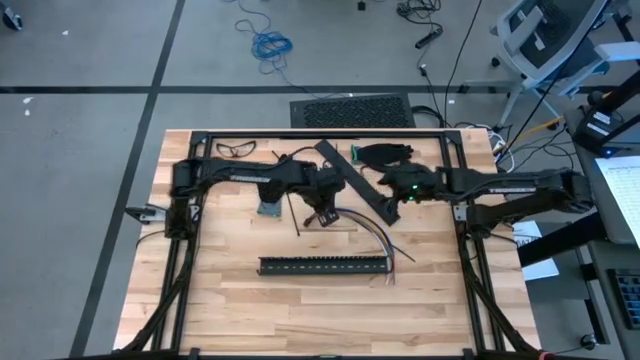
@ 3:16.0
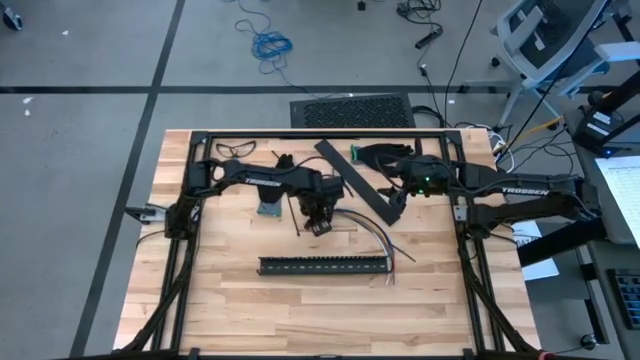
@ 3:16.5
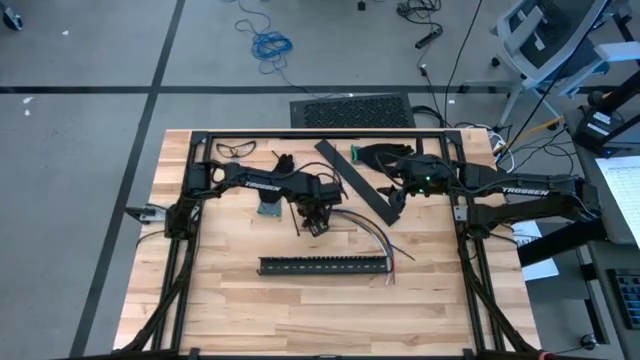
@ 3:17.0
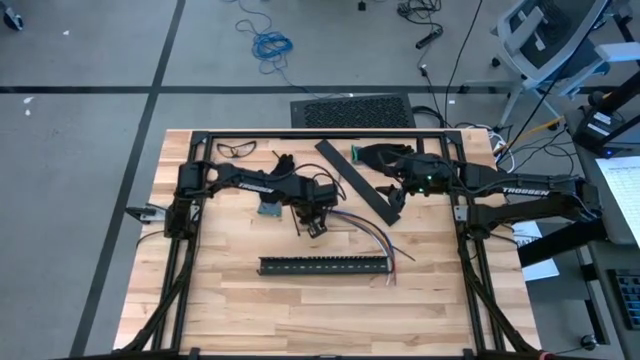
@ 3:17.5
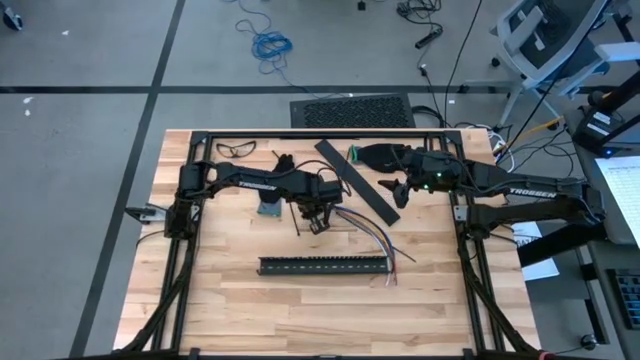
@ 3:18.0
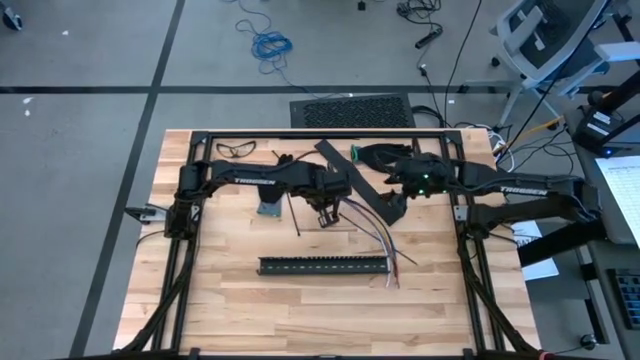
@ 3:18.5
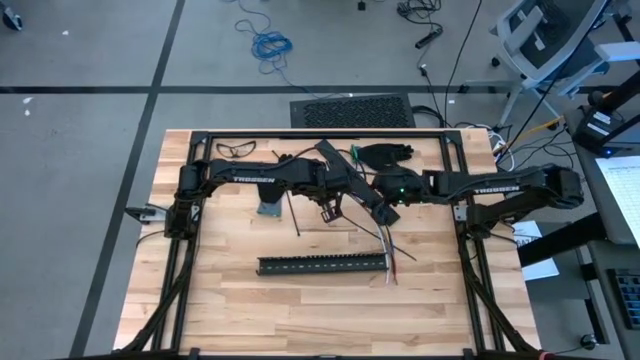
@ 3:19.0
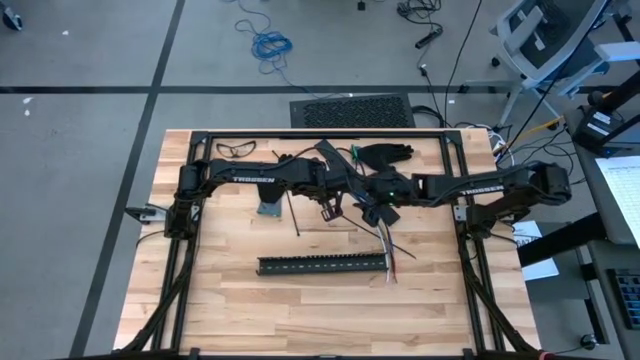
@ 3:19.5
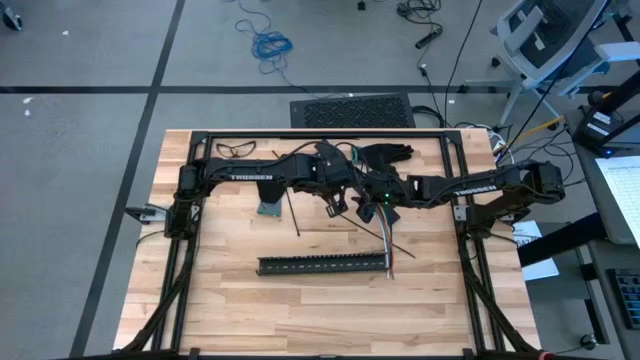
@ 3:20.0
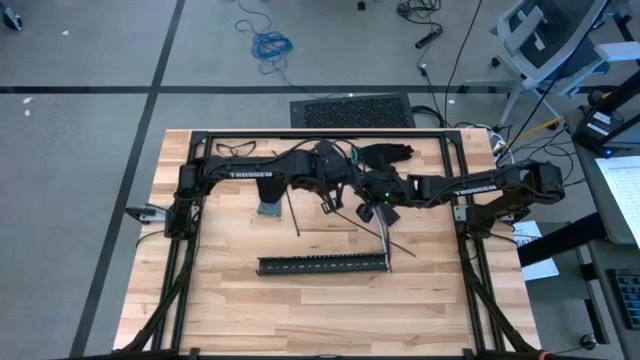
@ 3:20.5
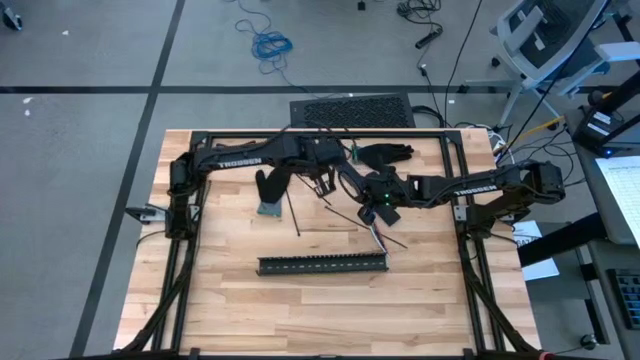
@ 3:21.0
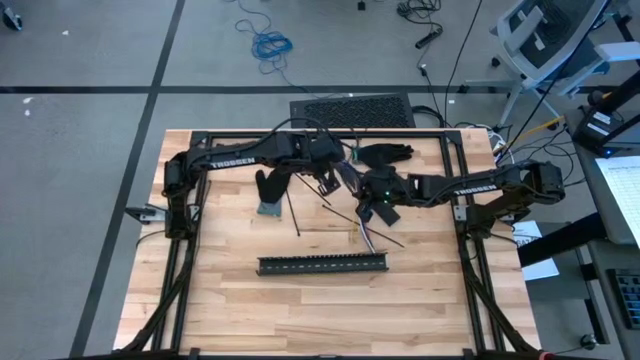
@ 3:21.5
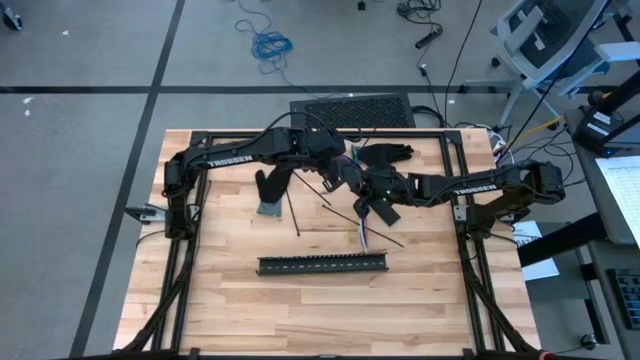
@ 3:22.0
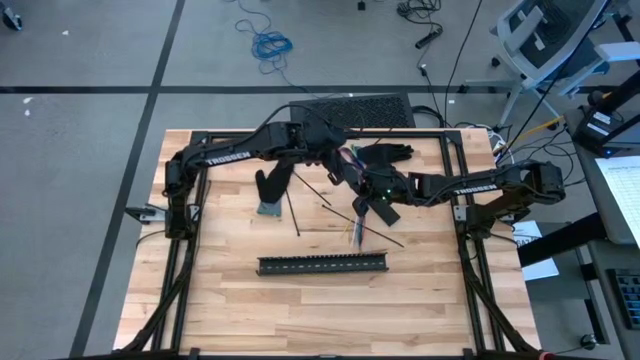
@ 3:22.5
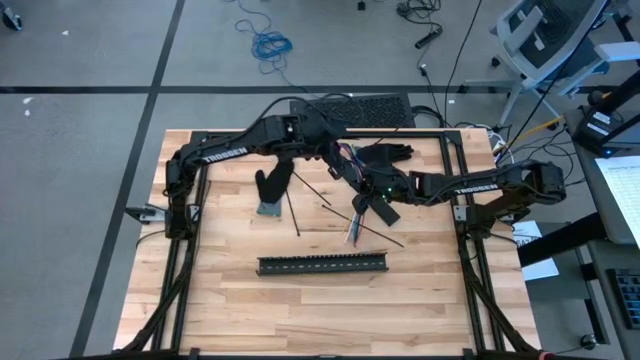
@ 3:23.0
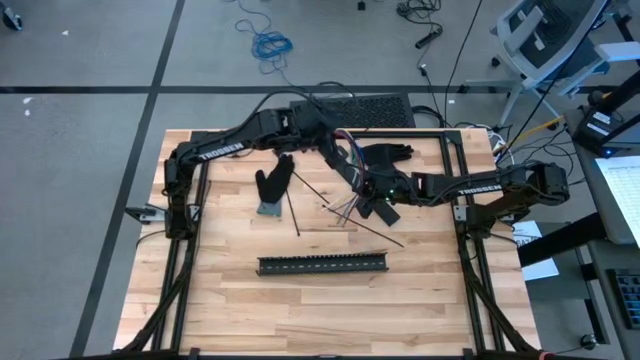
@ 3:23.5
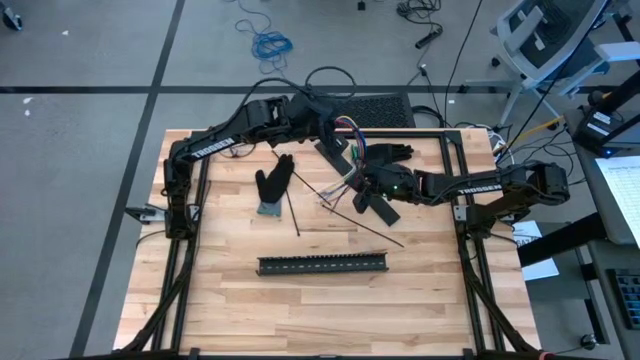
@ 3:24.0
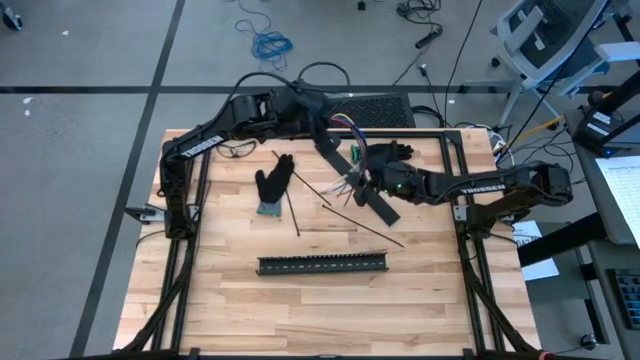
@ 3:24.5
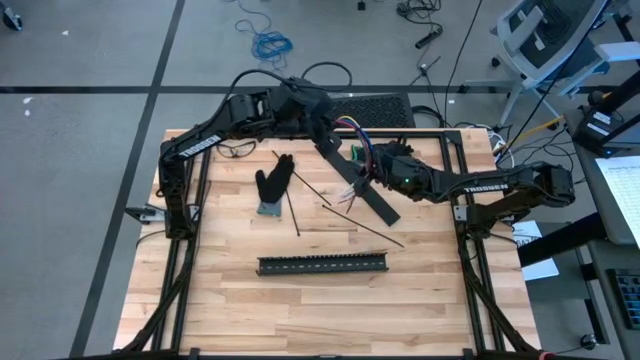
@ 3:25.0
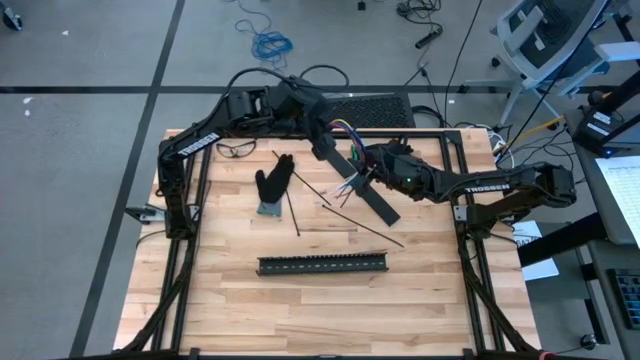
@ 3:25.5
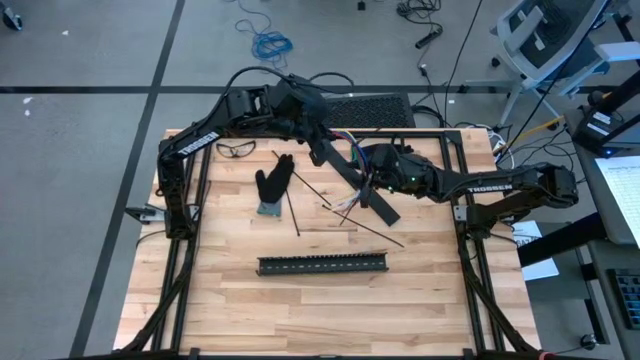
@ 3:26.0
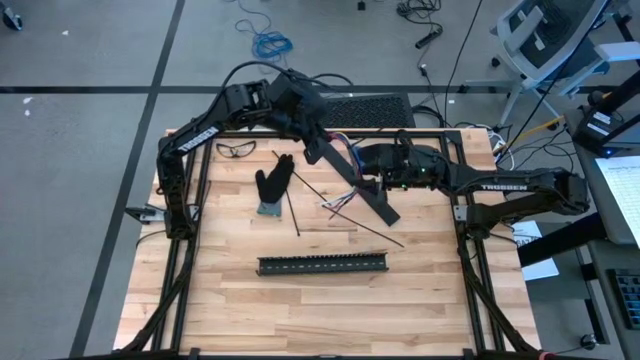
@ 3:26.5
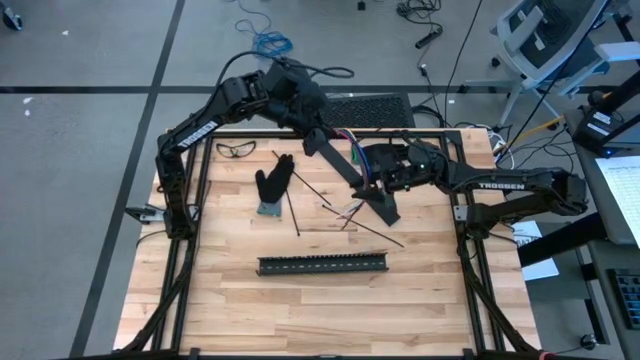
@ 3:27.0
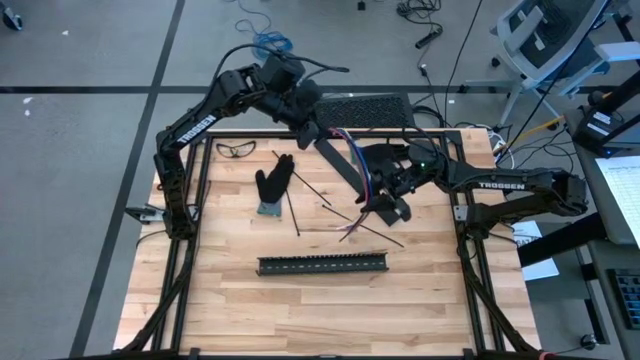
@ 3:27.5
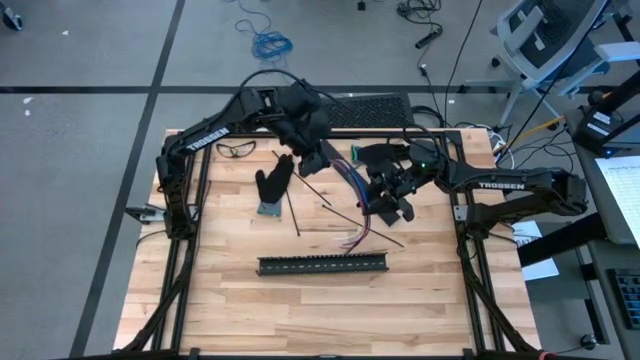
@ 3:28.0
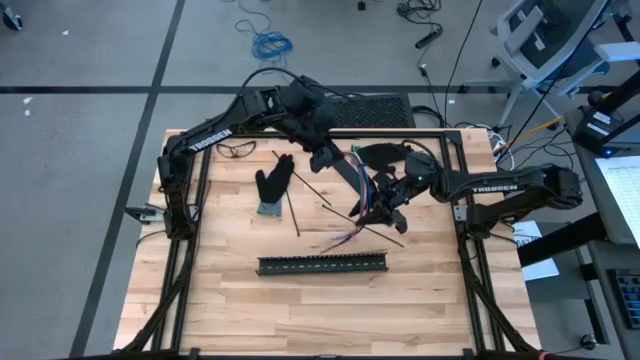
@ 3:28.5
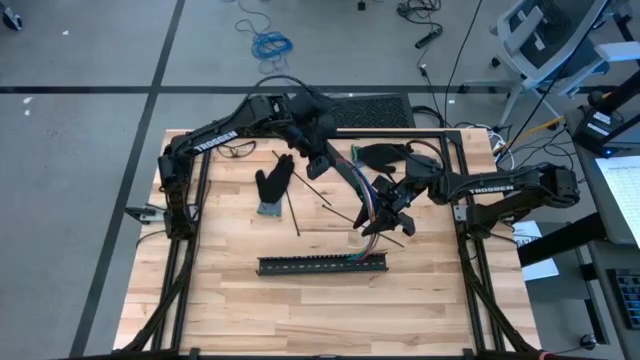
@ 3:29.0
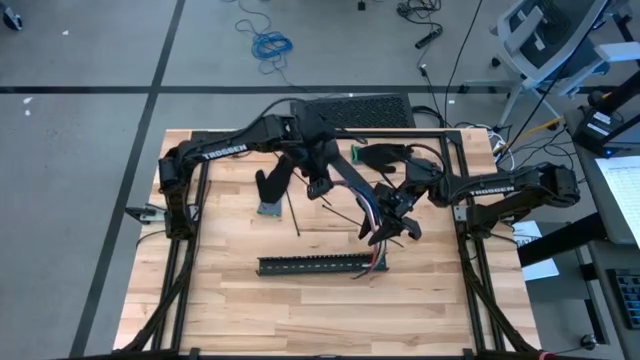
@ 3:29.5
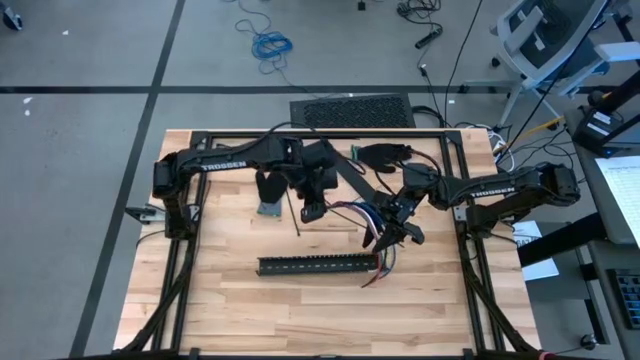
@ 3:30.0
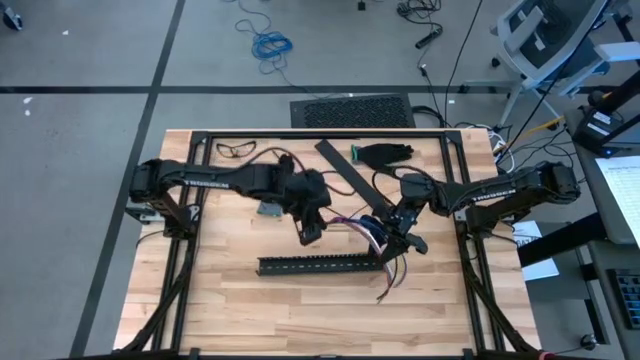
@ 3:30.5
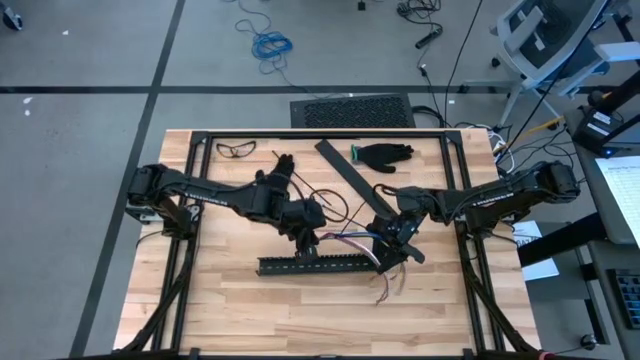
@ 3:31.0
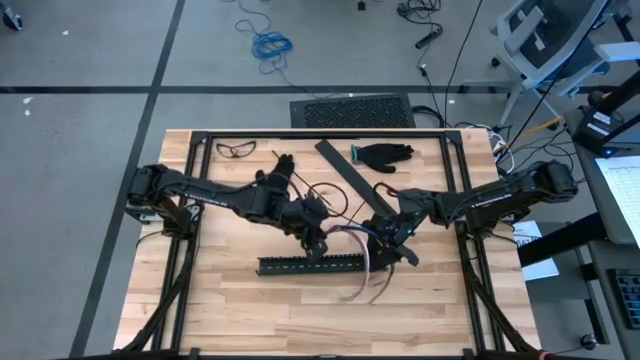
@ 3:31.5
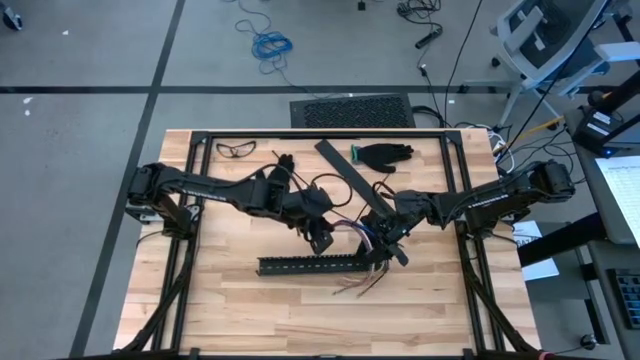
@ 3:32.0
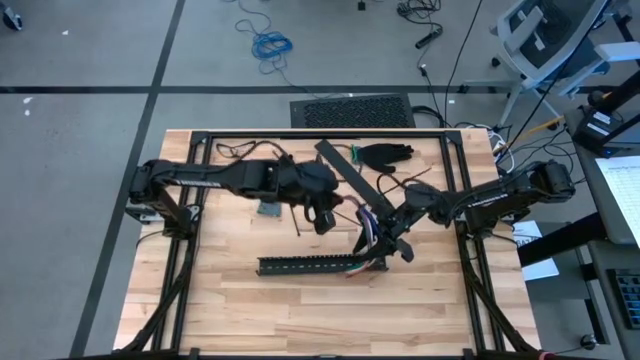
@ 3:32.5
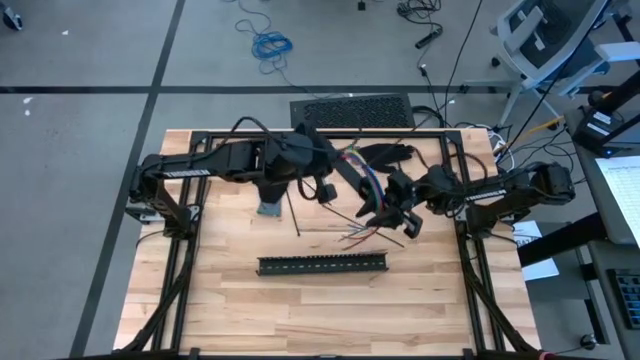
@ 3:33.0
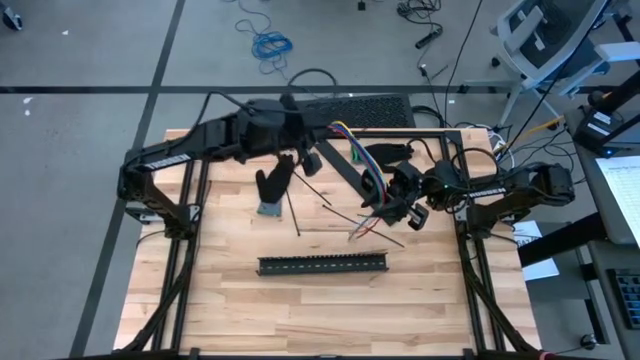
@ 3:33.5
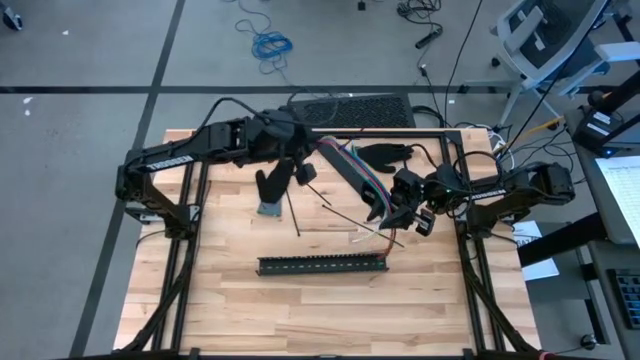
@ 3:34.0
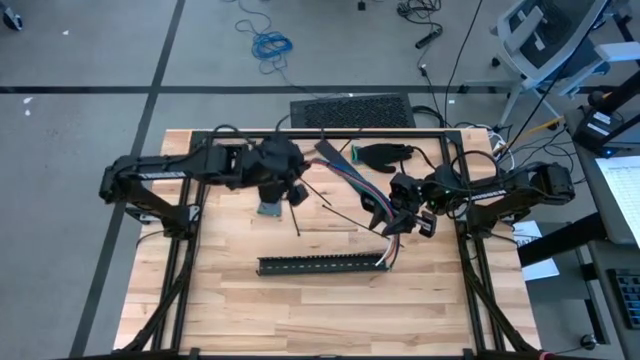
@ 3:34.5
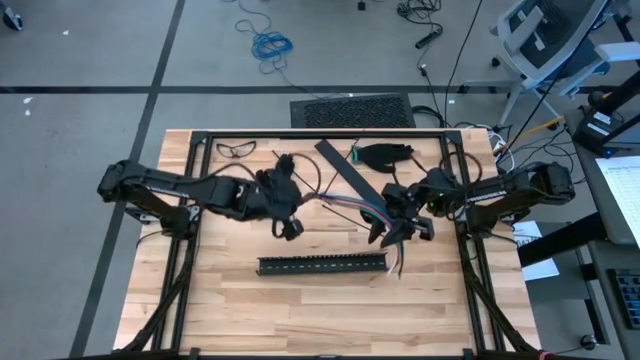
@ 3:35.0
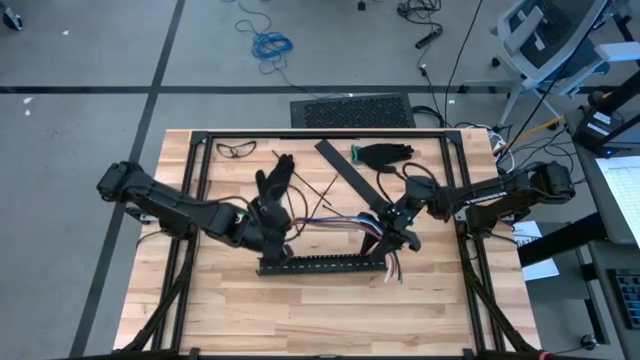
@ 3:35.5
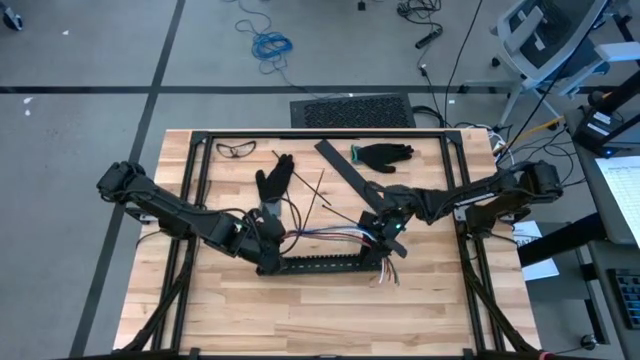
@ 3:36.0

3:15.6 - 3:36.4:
Task: Ziptie cables
Put the ziptied cables in the black cable duct

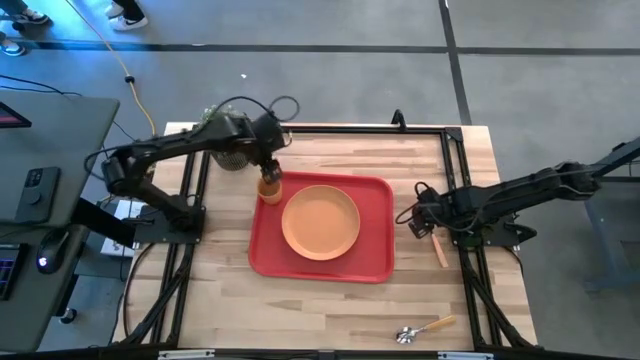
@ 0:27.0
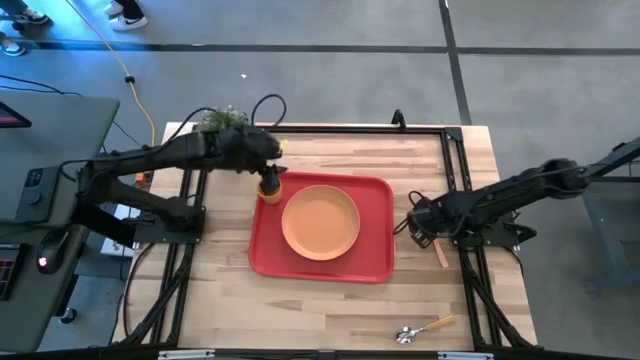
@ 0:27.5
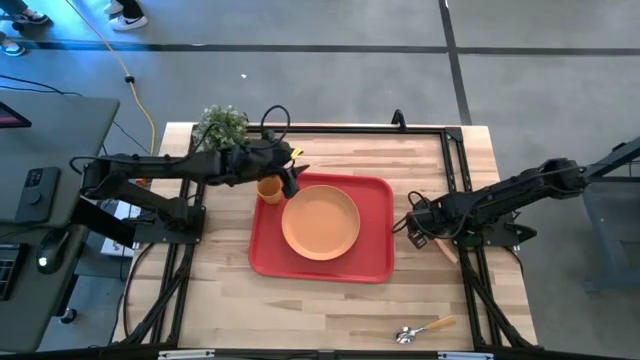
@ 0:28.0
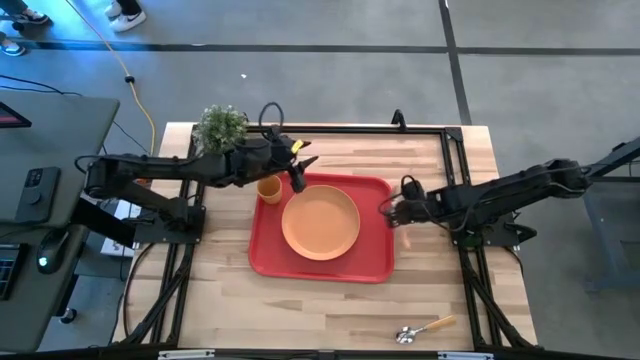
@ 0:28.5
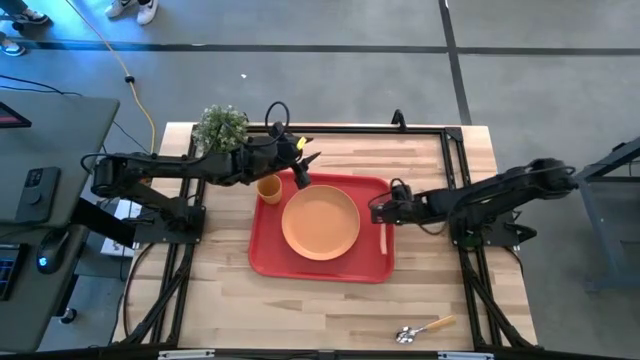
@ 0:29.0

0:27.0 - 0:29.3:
Task: Pick and place plate/cup/fork/spoon on tray
Put the orange fork on the red table tray to the right of the orange plate
